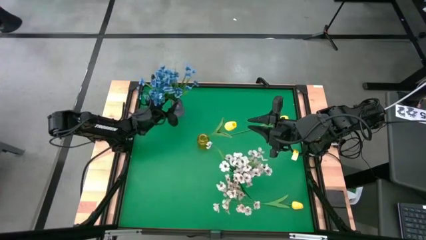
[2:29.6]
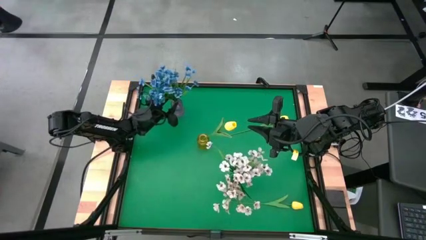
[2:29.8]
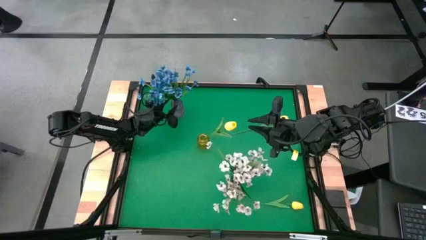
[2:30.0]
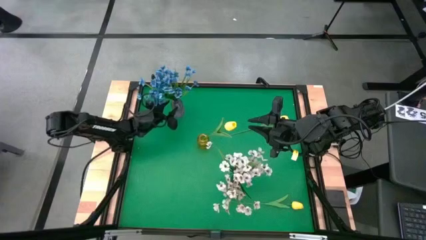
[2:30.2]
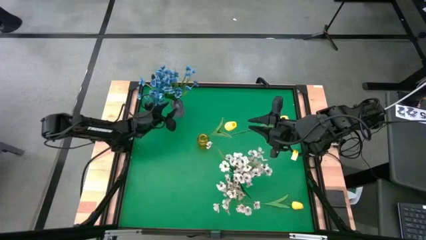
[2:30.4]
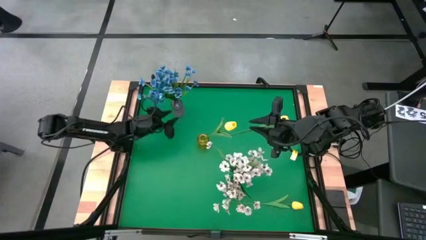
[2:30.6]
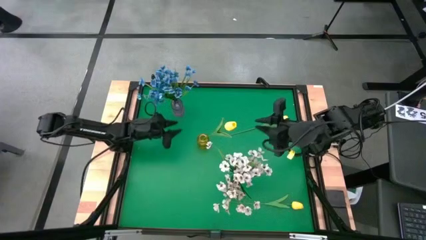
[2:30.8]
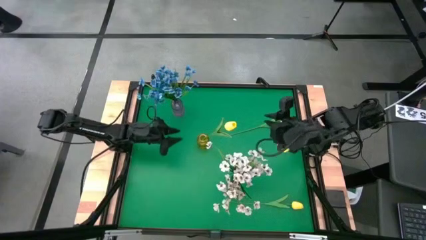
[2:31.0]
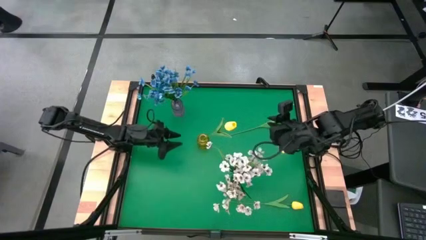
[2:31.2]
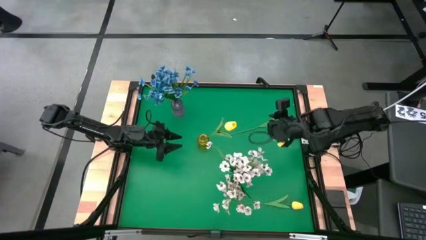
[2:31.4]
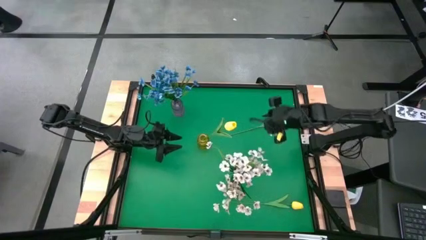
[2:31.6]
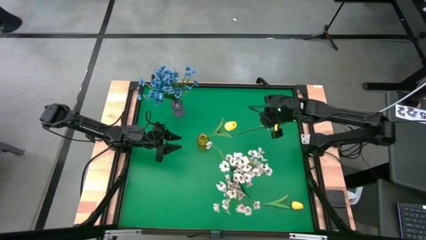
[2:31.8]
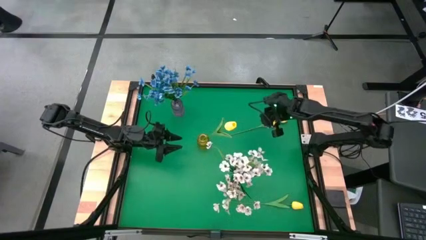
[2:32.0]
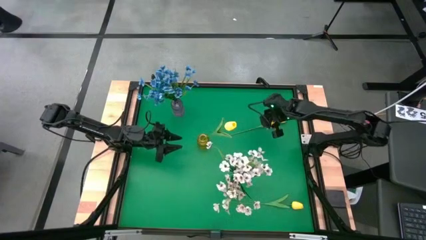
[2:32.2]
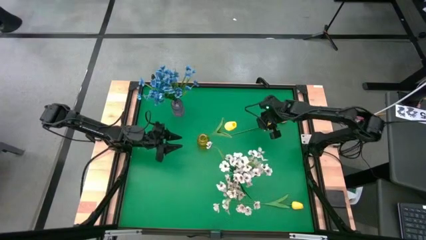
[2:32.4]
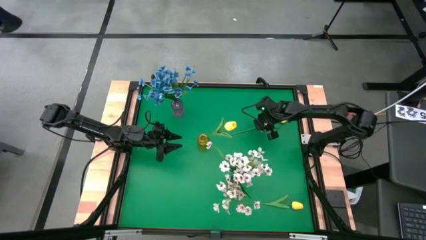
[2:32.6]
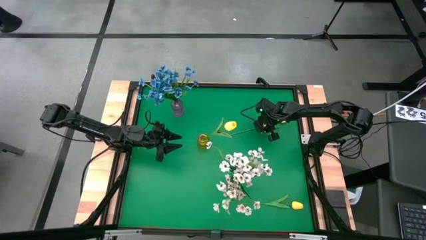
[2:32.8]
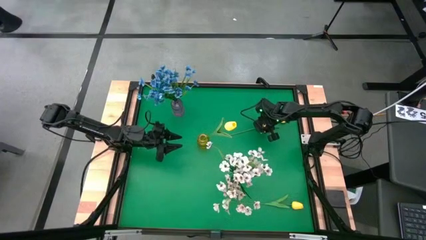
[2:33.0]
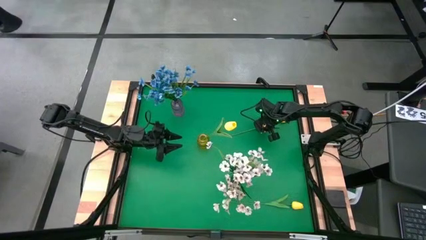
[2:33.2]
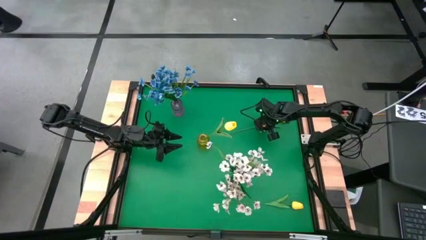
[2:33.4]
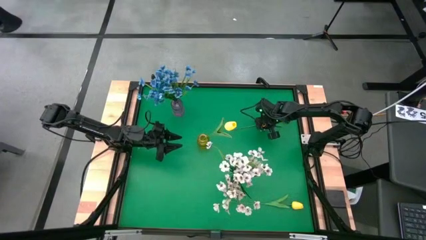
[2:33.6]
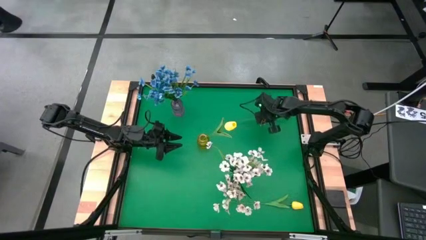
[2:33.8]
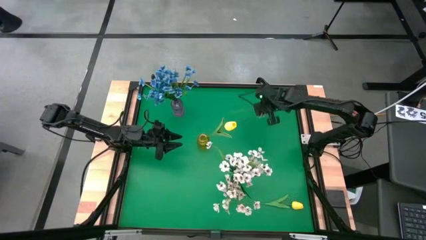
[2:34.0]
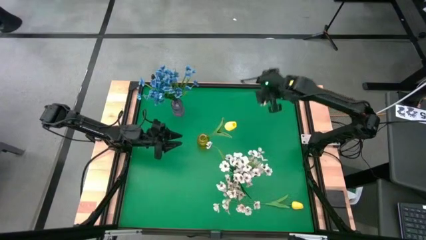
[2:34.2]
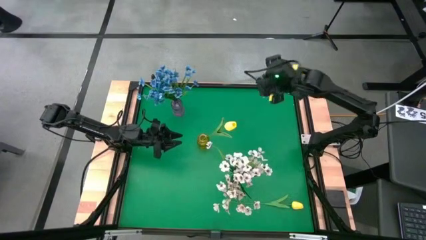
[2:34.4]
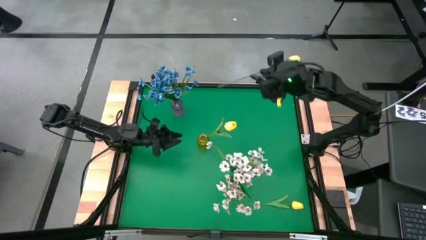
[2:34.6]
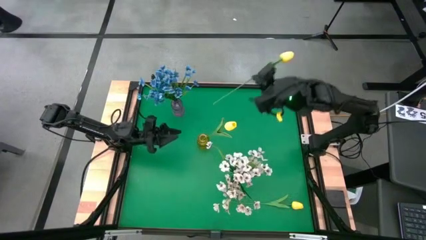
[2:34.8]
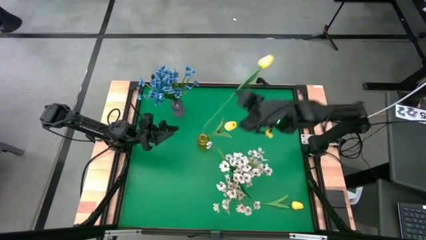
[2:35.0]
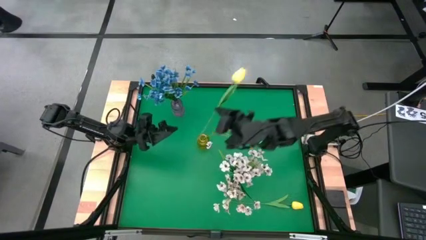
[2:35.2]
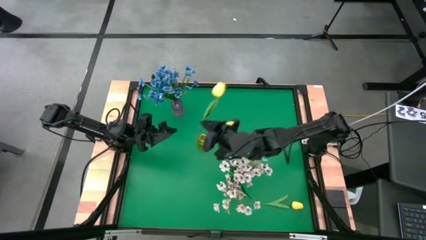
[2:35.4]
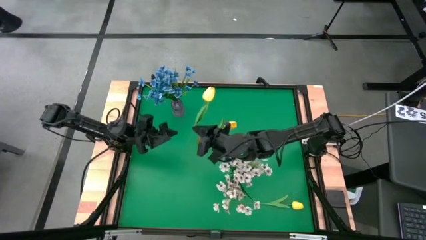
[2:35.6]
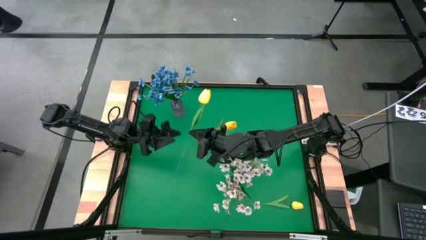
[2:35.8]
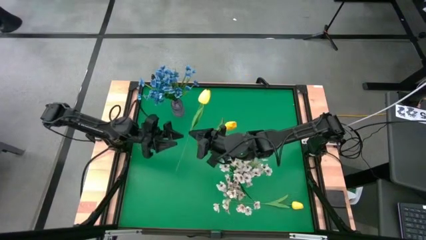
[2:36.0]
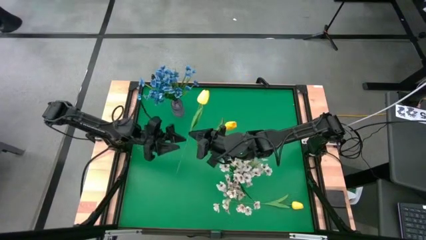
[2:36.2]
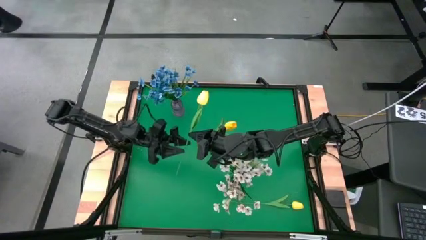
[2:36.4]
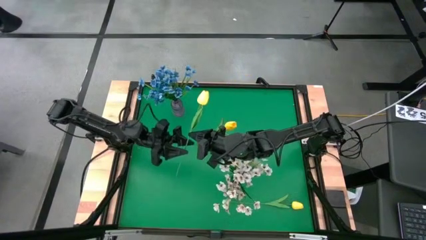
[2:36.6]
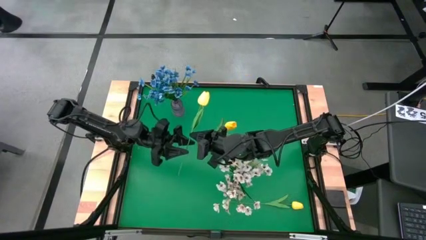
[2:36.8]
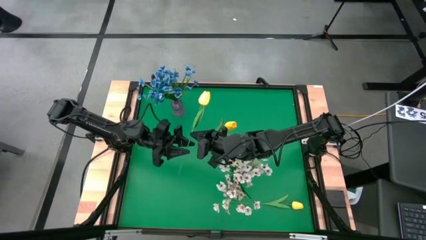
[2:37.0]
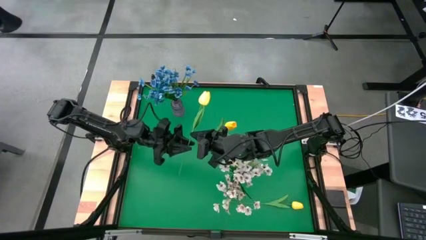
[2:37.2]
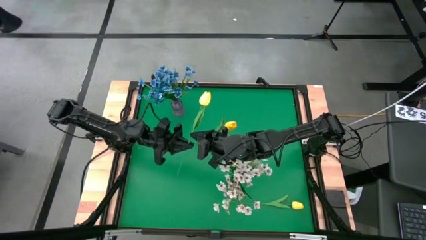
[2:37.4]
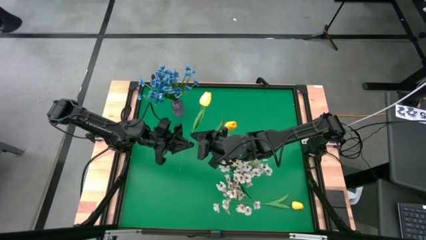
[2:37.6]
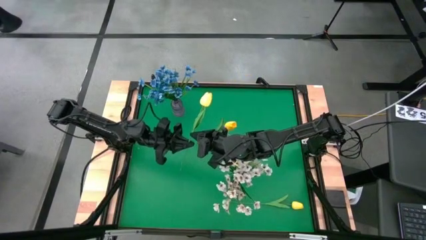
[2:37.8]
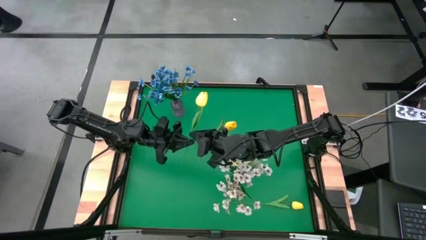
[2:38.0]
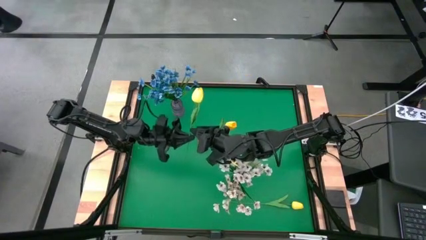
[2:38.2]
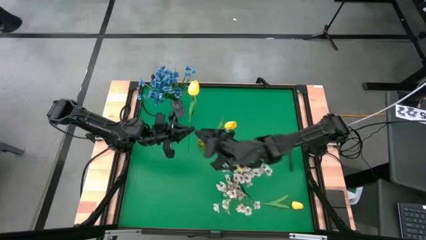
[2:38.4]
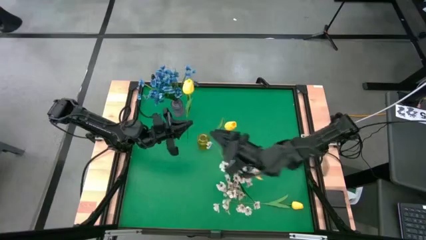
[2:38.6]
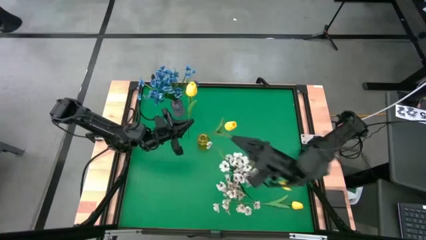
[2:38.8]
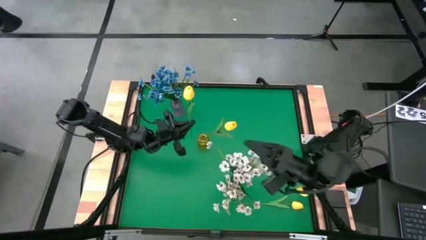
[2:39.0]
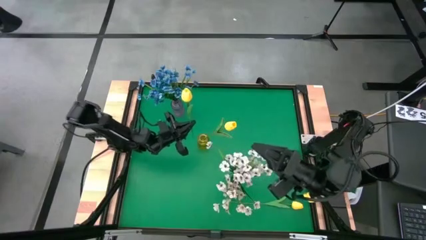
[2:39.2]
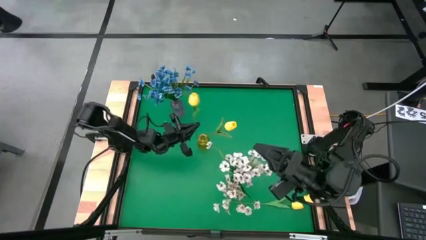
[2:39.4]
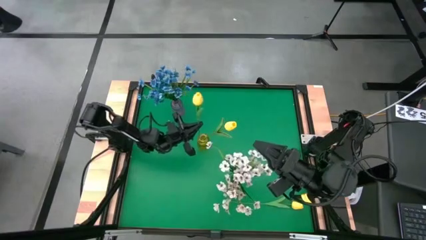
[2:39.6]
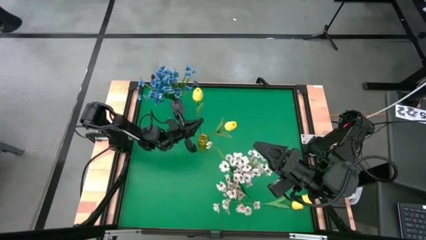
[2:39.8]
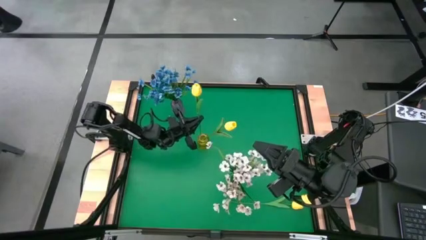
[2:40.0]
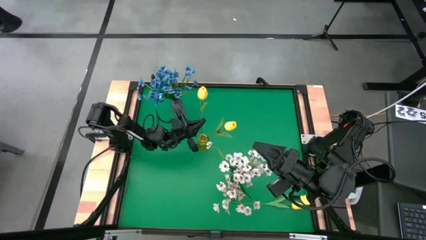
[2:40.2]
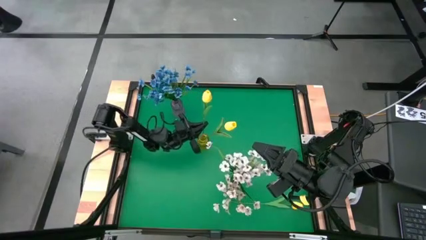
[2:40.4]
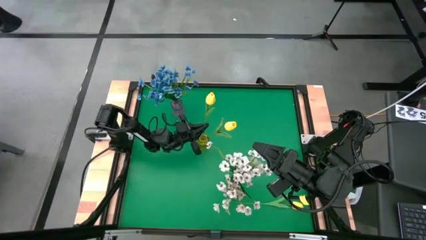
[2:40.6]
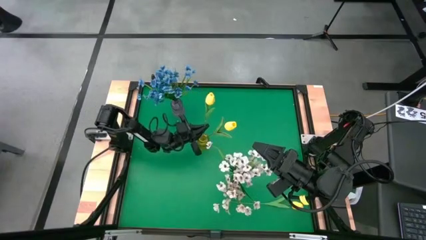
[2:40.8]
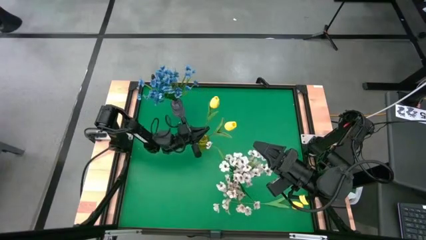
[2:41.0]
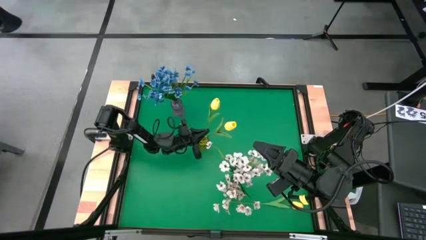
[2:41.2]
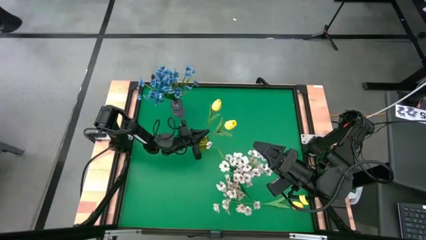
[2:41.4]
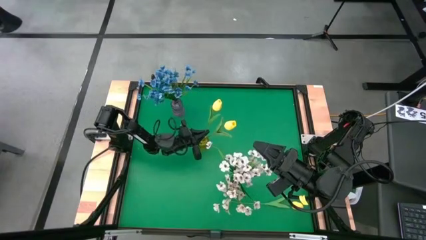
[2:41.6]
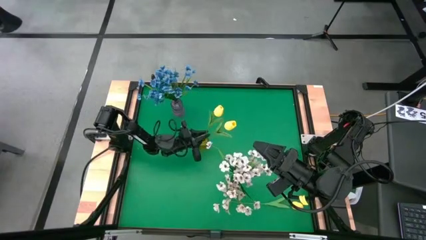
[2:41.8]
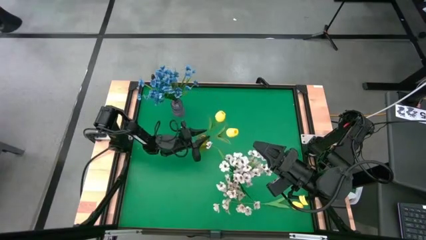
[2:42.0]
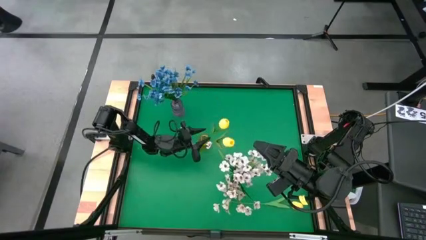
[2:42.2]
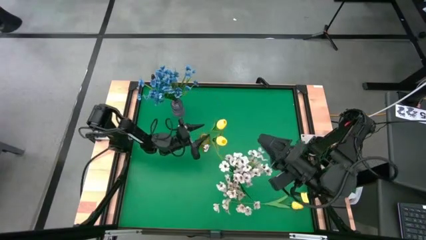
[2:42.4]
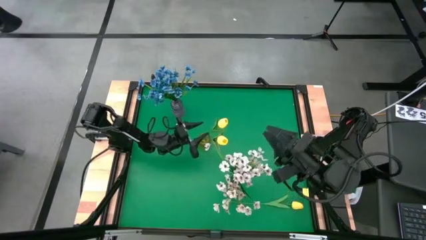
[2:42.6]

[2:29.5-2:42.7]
Task: Sort flowers into vase by color
Put the top yellow flower into the yellow vase

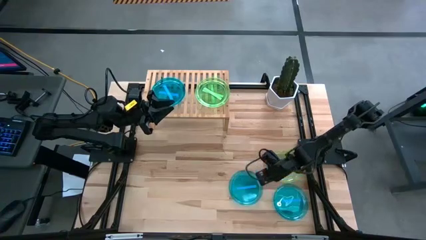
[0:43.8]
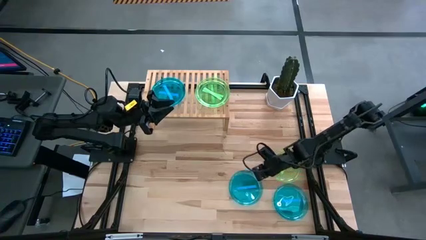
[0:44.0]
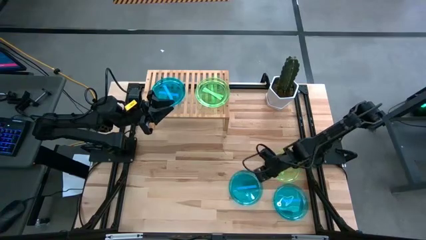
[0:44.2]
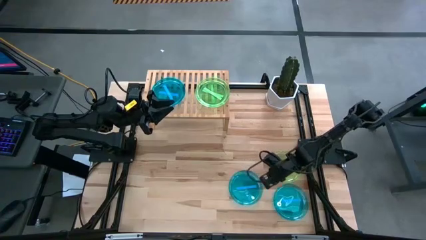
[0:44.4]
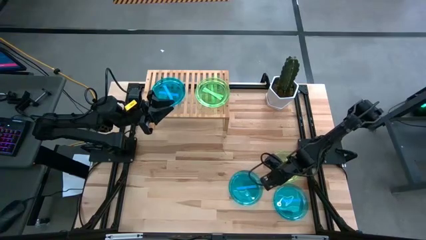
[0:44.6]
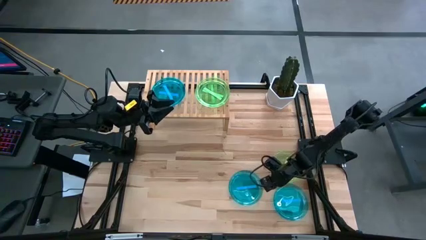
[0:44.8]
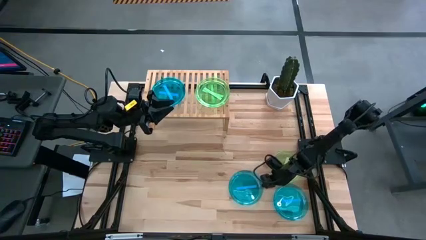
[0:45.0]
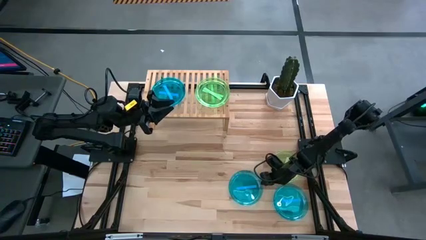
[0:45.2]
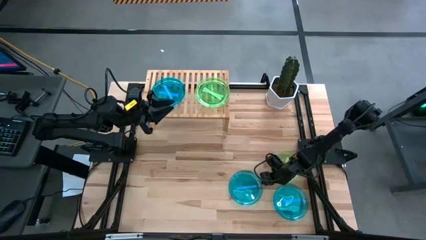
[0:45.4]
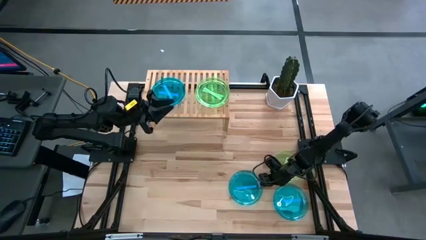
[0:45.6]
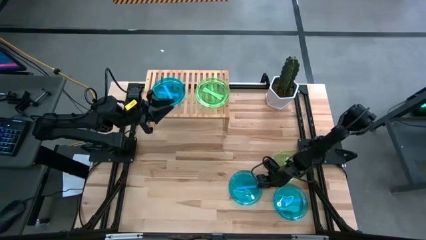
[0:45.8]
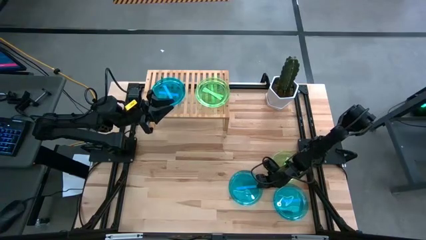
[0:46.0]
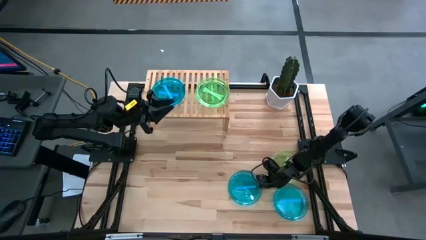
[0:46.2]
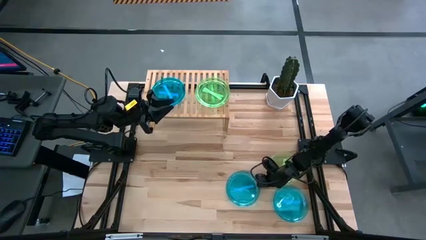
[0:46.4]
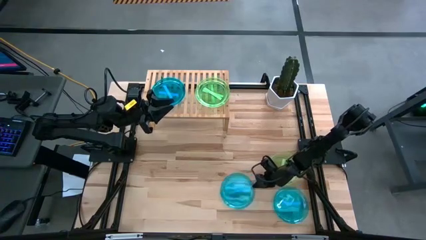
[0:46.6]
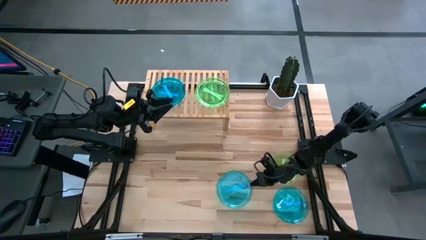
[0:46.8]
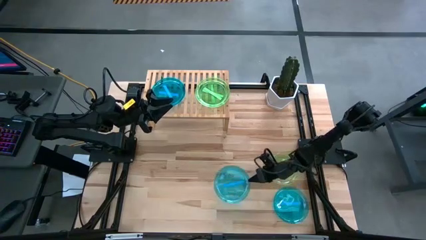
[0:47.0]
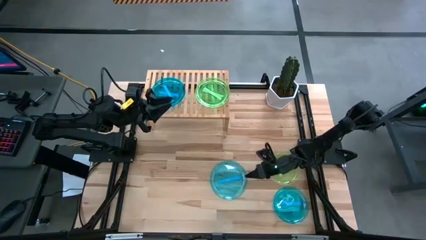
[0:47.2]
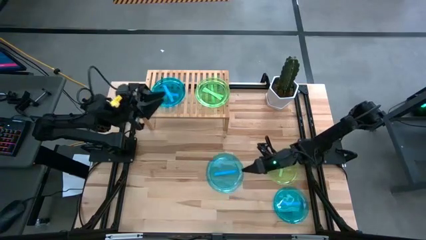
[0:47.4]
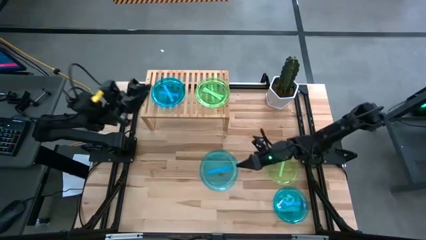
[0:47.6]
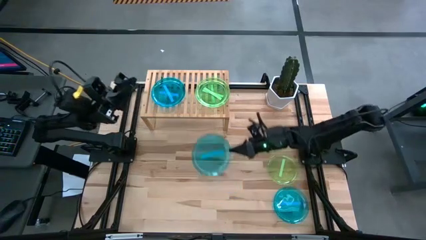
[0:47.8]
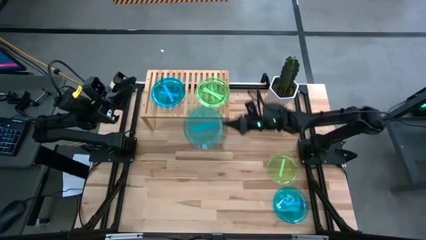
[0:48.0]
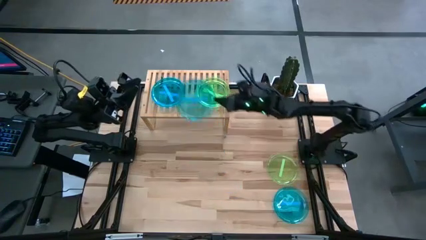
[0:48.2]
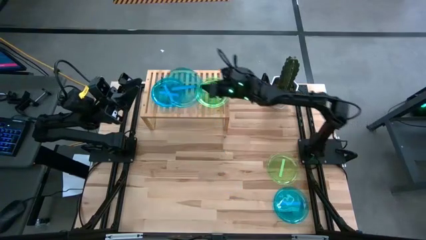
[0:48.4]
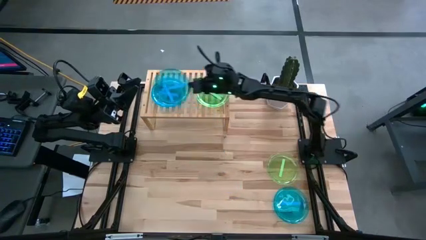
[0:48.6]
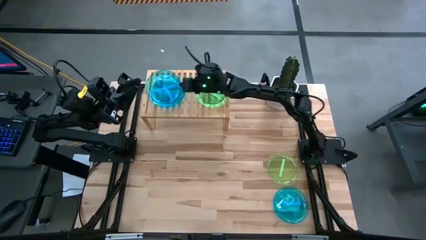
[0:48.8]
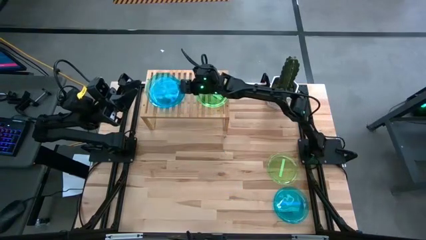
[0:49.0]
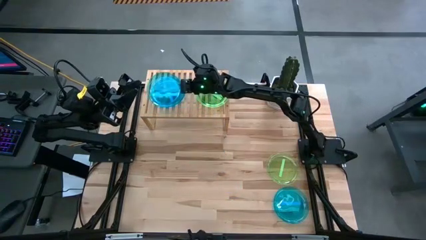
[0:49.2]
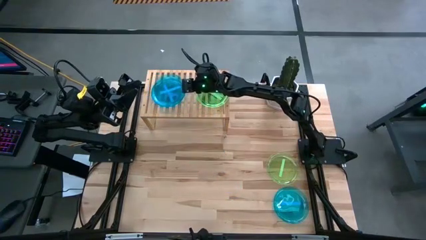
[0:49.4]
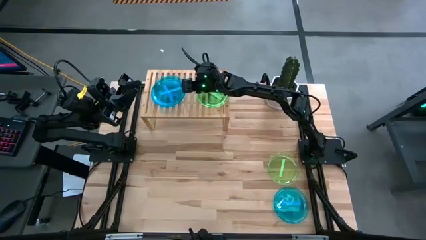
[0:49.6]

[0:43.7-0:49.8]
Task: Place and stack plates onto a shelf
Stack the blue plate on top of the blue plate on the shelf
